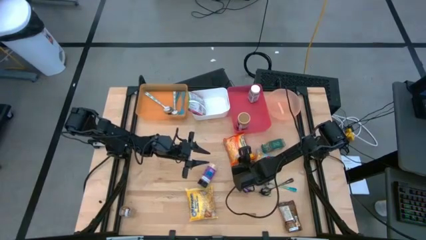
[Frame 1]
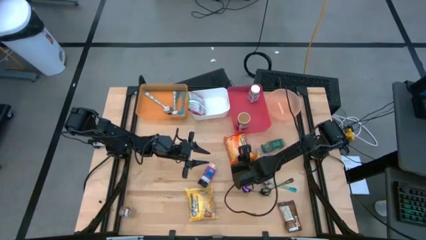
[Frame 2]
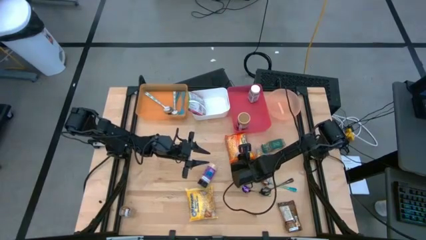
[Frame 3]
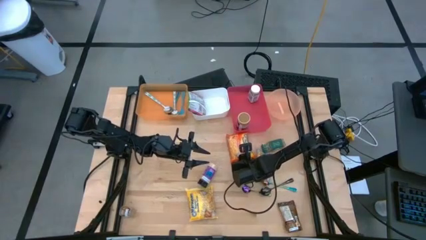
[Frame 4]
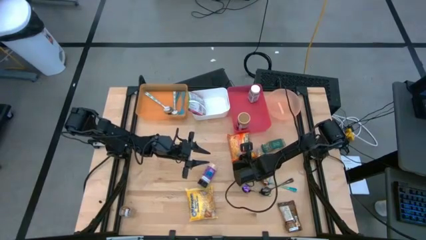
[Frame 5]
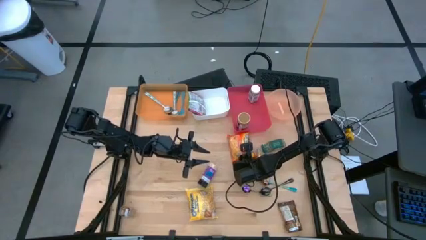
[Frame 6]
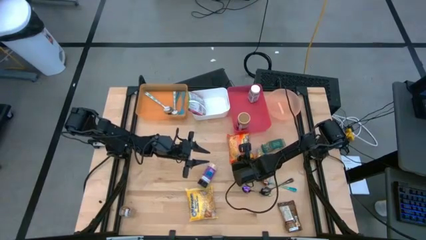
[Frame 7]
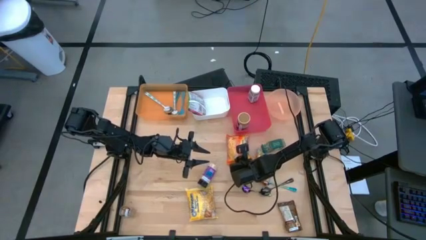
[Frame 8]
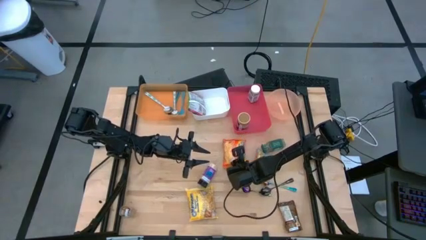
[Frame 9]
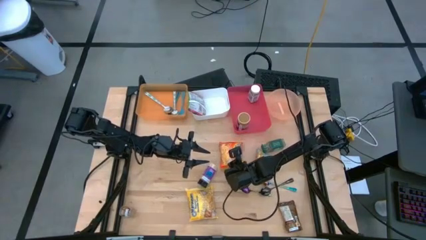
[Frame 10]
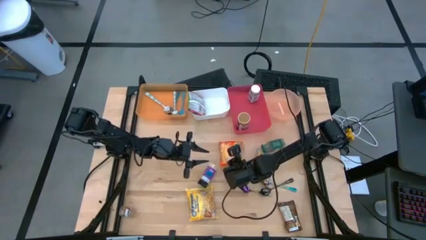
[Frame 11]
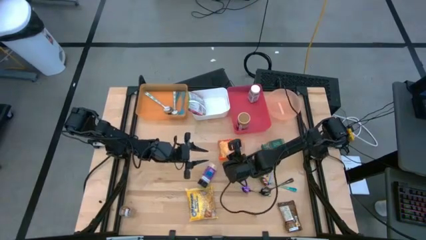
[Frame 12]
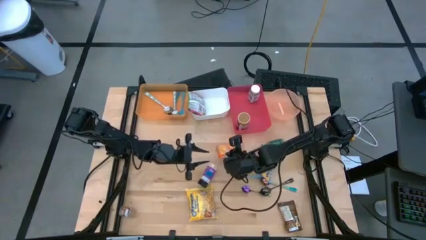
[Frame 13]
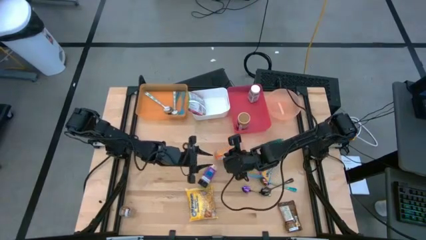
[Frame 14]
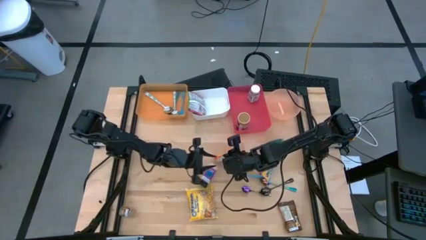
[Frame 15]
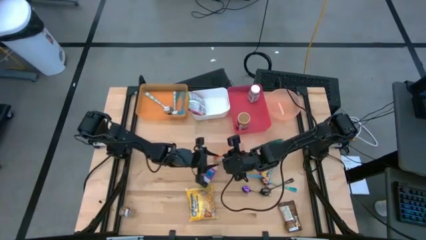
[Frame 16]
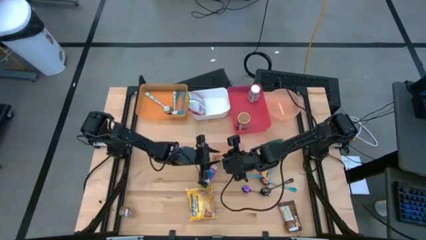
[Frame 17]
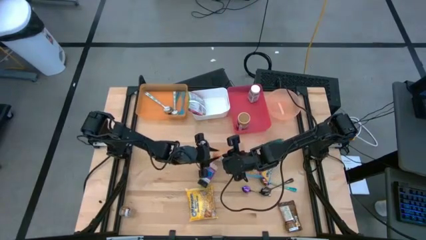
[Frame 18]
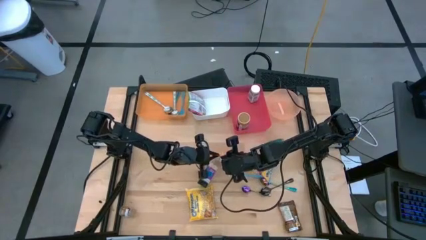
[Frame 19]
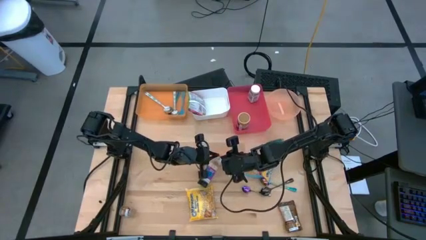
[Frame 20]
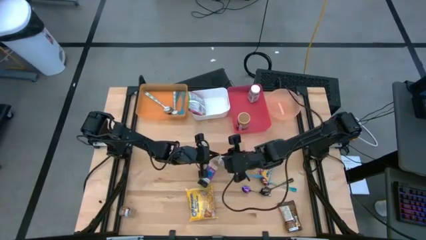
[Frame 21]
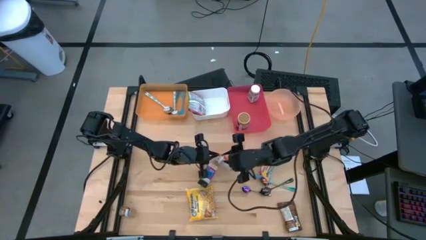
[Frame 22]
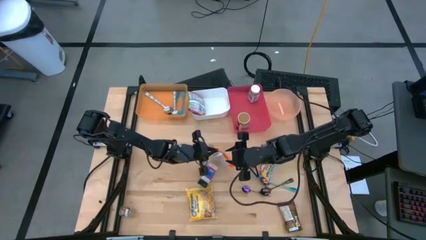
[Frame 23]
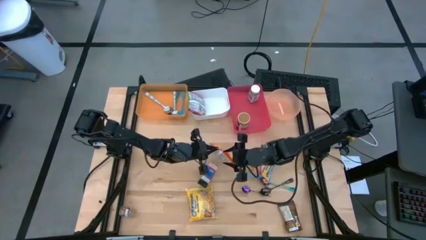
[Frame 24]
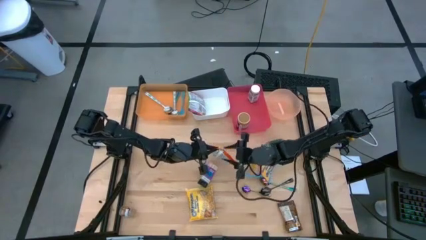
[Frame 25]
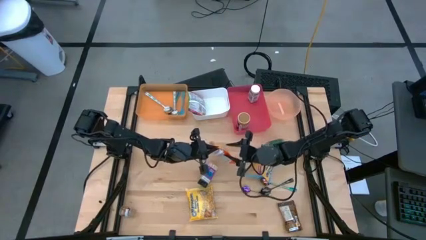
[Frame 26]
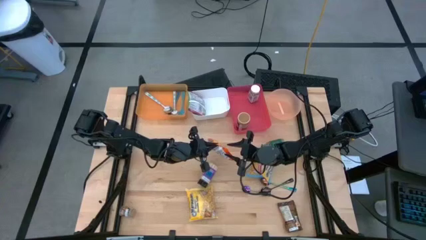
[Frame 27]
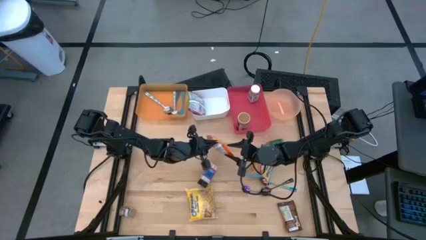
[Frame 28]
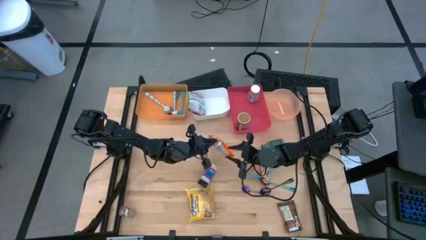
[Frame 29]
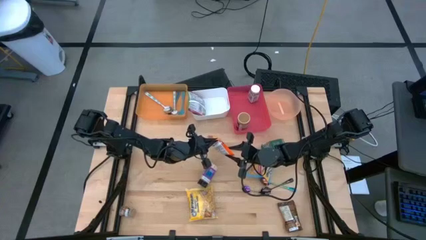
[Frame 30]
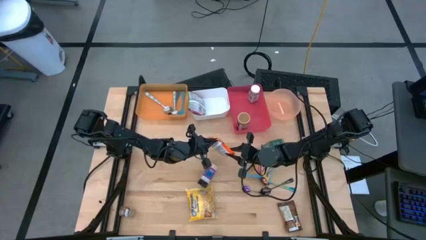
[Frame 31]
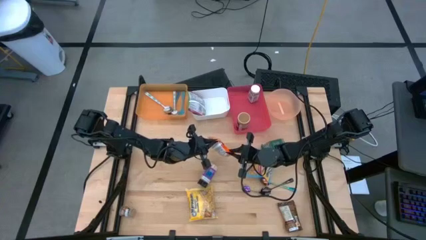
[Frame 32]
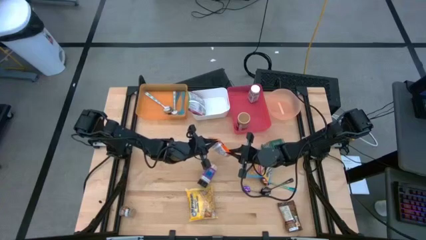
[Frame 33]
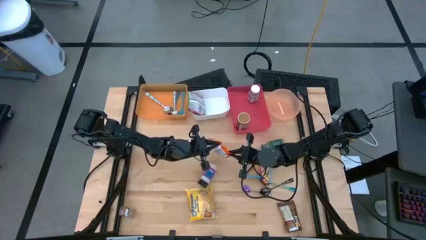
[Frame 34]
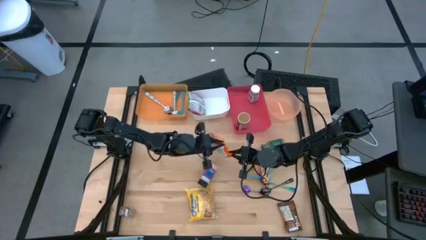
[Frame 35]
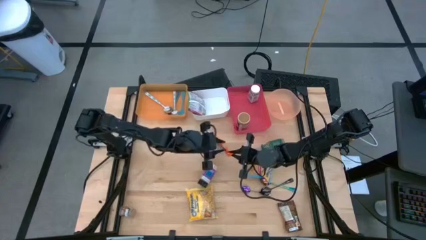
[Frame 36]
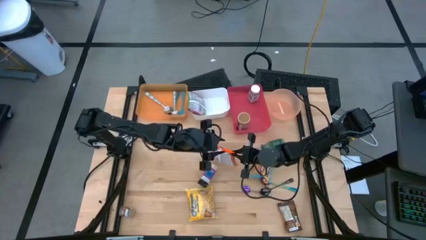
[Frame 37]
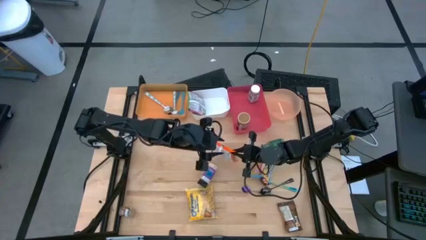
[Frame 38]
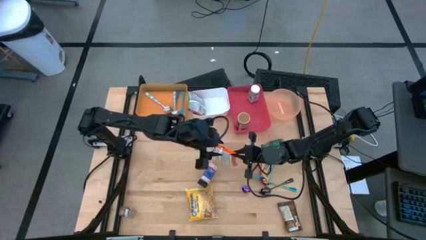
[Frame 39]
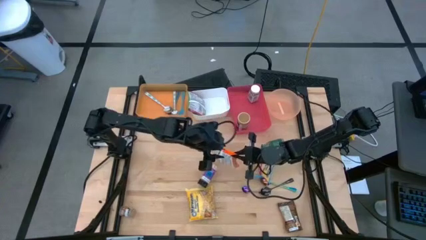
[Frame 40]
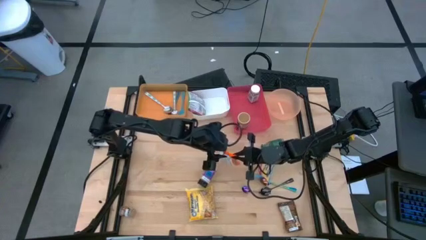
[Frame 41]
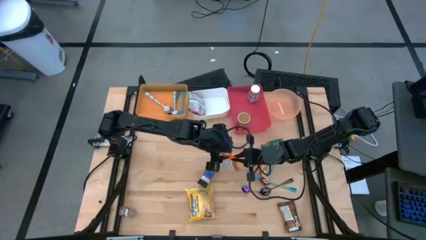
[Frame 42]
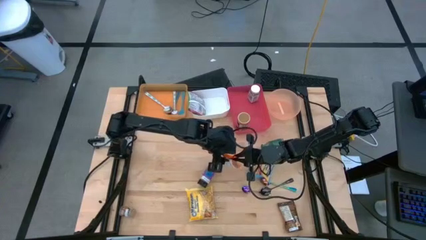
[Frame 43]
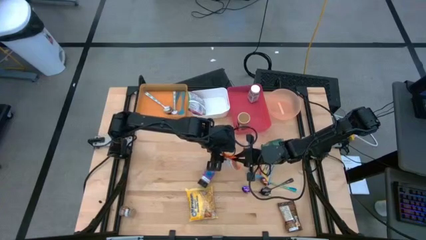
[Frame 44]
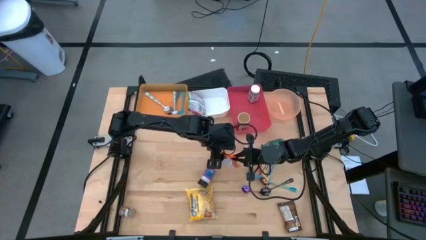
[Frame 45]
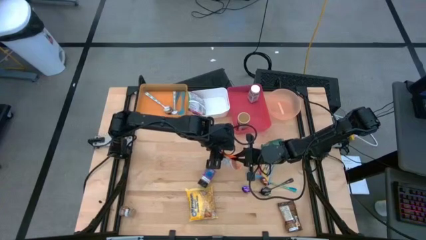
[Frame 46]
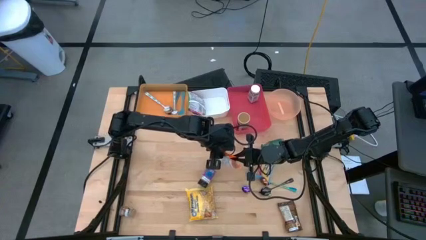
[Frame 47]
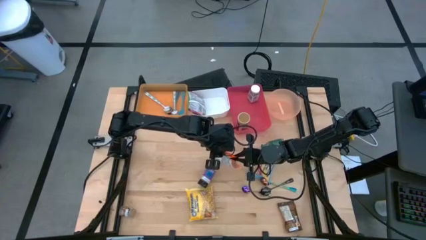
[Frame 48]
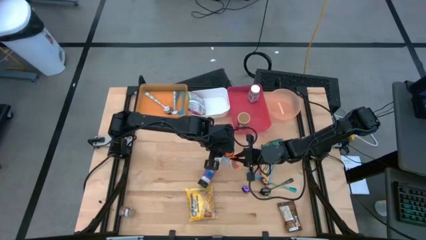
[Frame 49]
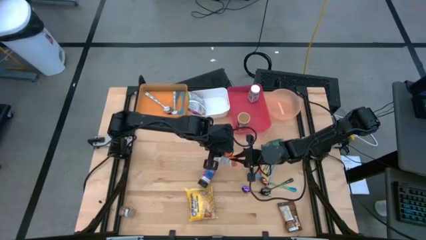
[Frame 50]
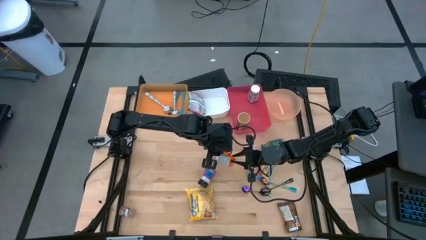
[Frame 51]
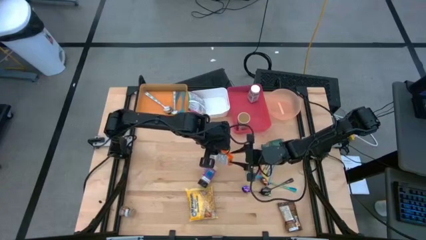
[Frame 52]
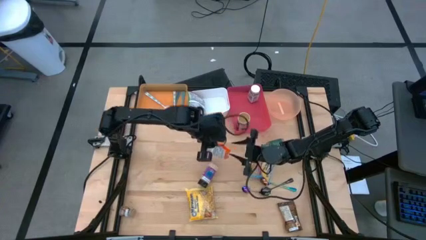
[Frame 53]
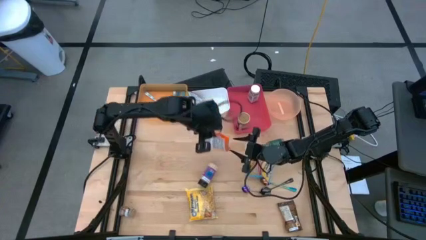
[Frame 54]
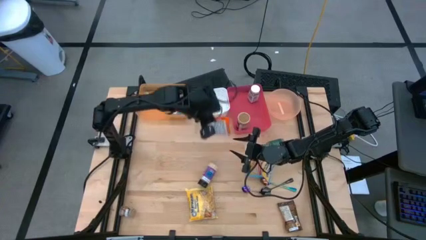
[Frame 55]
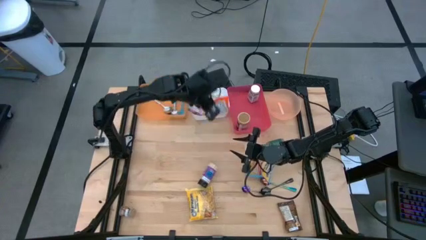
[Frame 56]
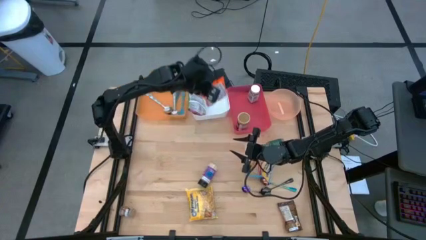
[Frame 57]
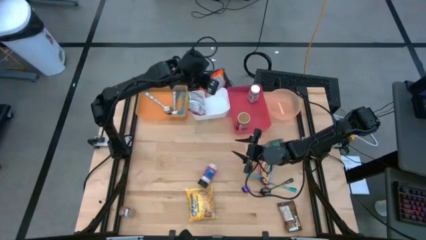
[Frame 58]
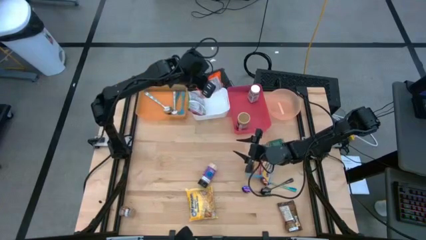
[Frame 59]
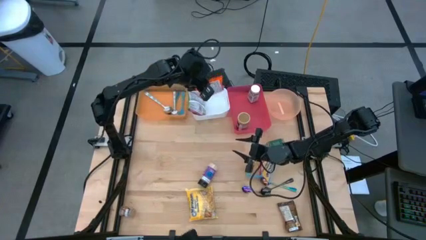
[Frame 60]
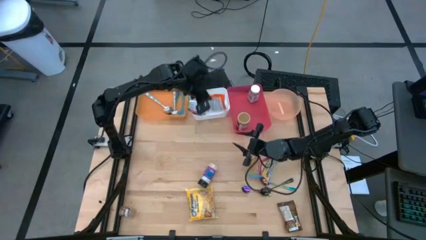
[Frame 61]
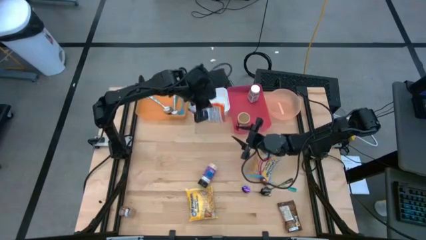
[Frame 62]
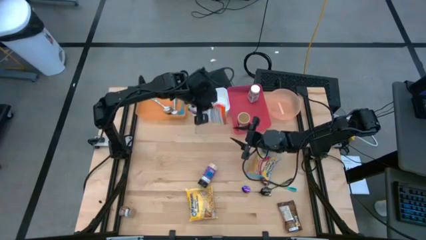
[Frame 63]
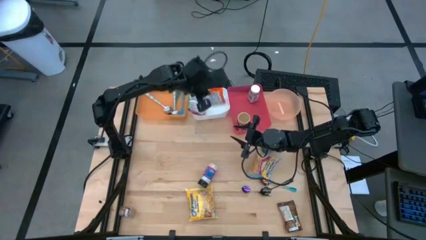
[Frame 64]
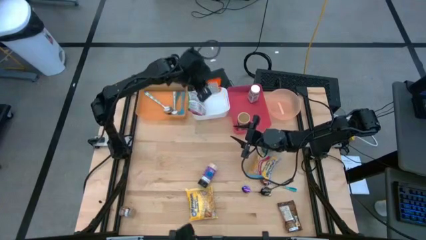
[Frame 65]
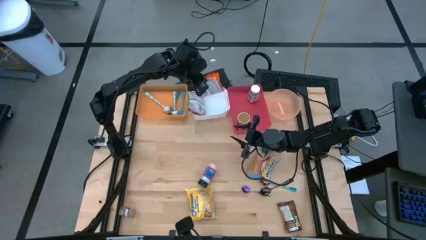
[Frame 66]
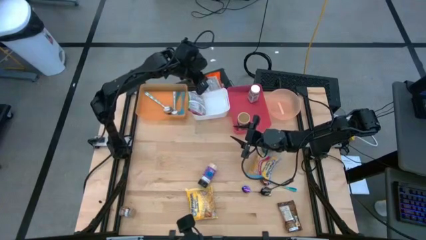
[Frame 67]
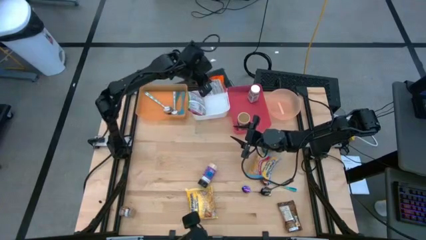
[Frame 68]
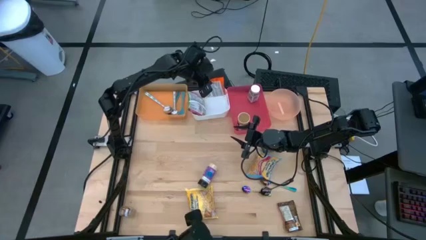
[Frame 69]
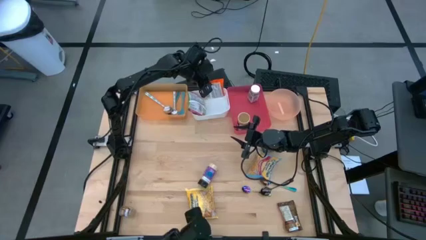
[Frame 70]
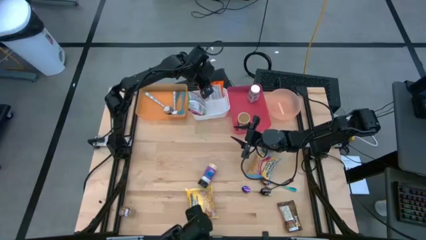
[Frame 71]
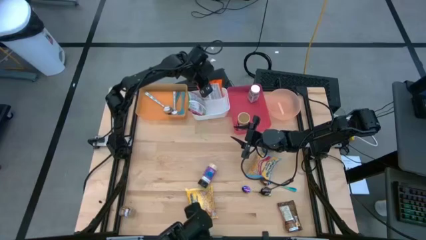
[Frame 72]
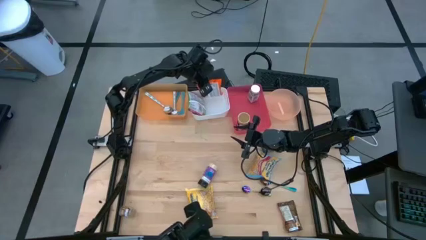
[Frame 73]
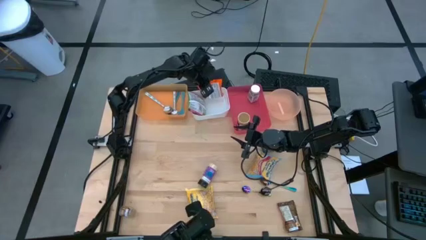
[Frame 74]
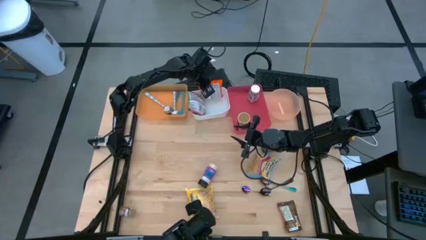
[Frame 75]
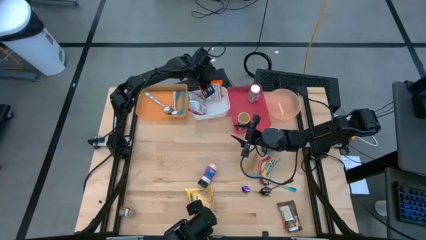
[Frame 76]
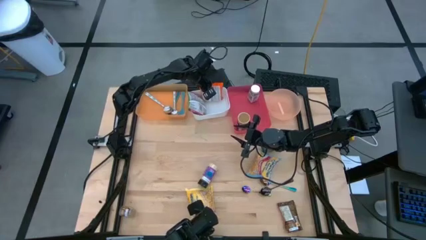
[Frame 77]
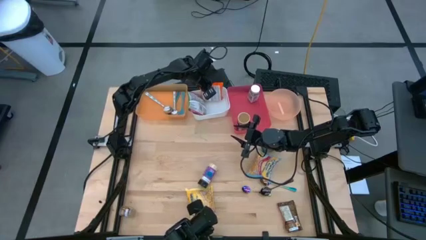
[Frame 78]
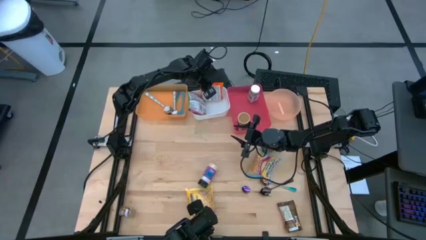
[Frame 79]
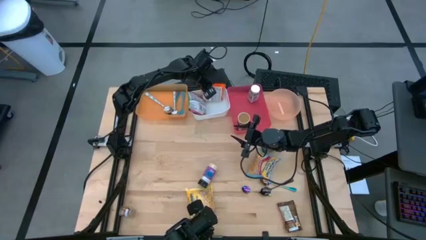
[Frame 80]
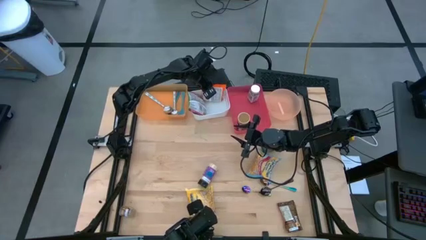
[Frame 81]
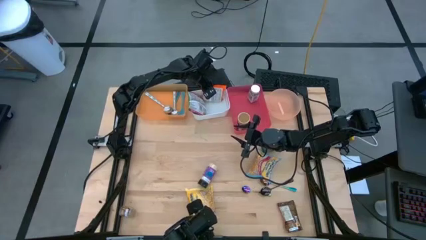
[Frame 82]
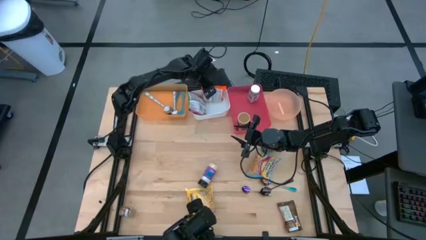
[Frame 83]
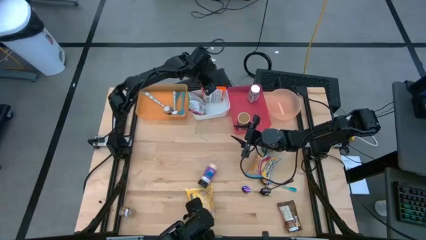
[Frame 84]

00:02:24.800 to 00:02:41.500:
Task: Pick & Place Food Item
Put the orange noodle pack into the white bin
